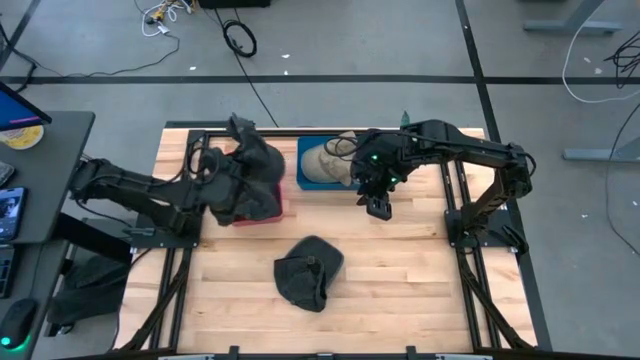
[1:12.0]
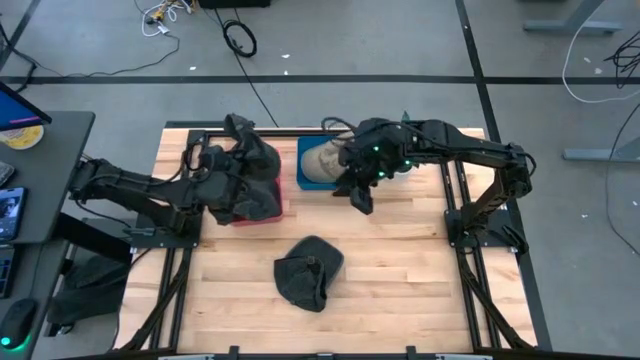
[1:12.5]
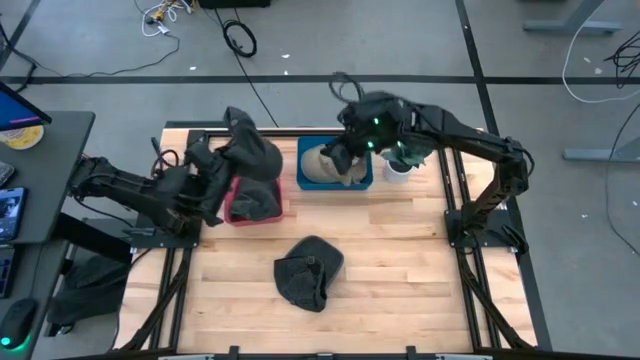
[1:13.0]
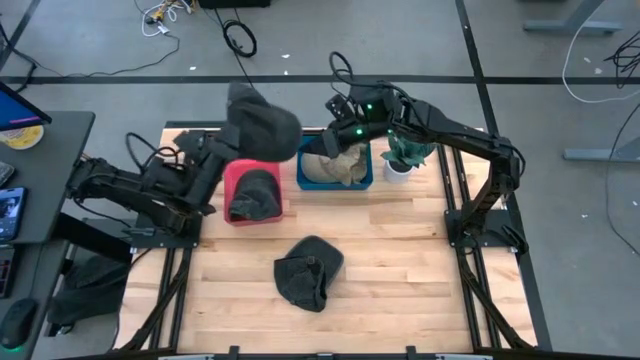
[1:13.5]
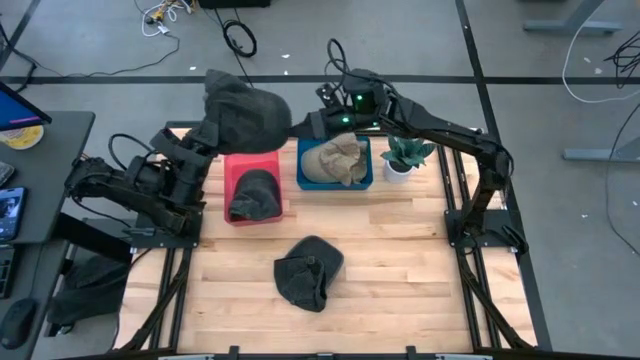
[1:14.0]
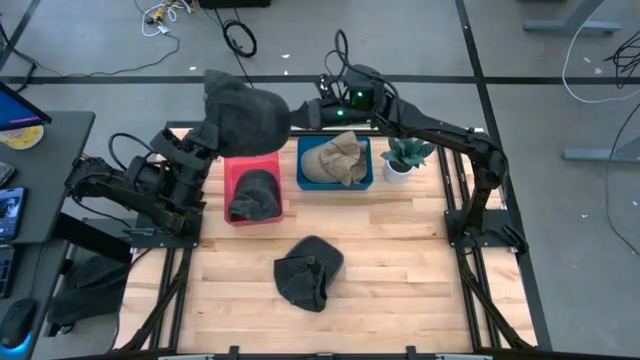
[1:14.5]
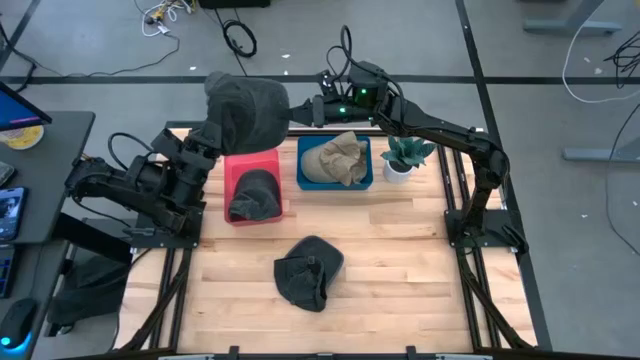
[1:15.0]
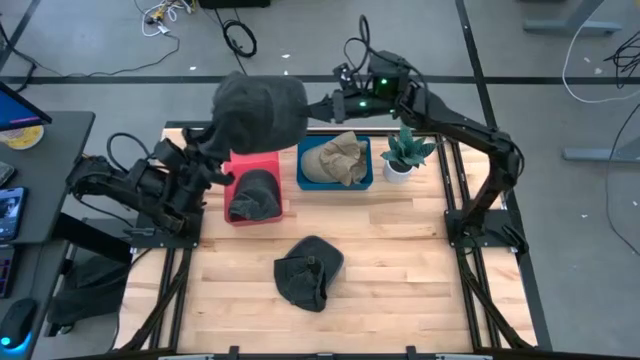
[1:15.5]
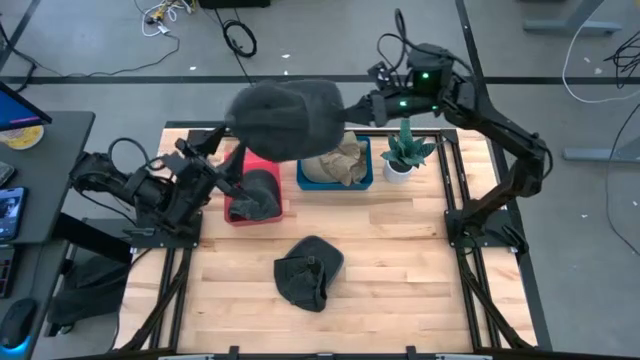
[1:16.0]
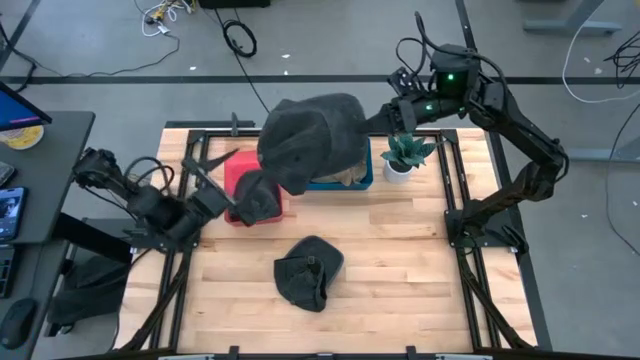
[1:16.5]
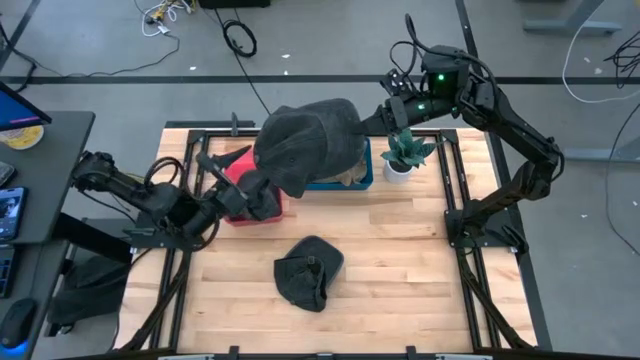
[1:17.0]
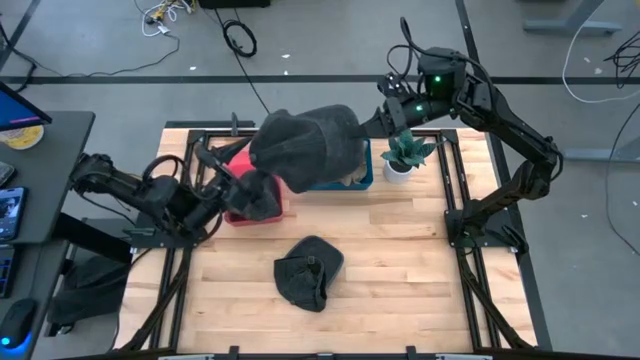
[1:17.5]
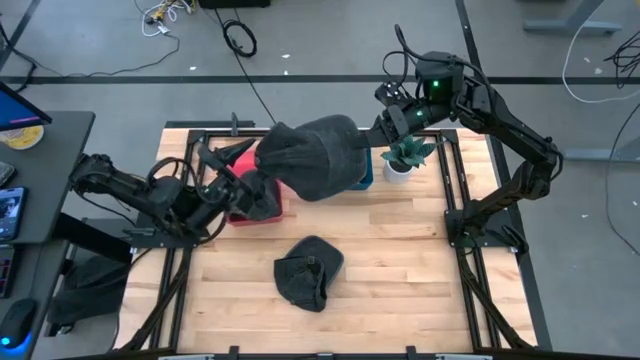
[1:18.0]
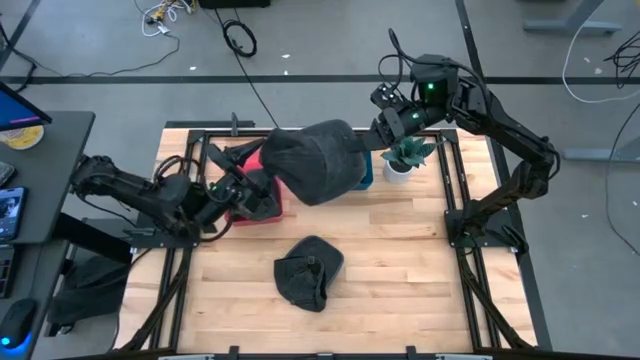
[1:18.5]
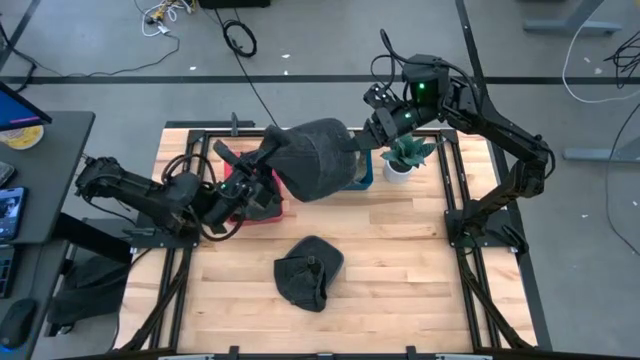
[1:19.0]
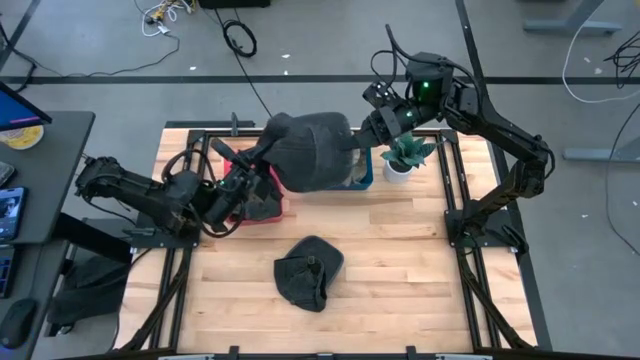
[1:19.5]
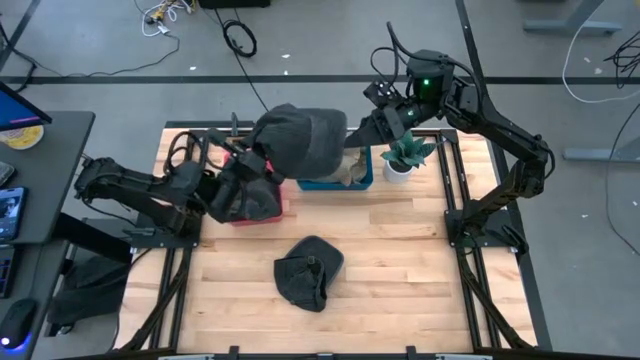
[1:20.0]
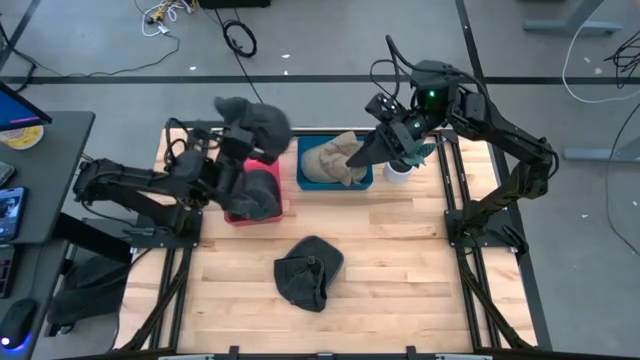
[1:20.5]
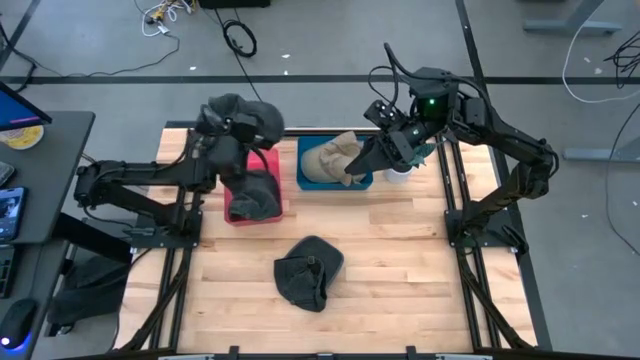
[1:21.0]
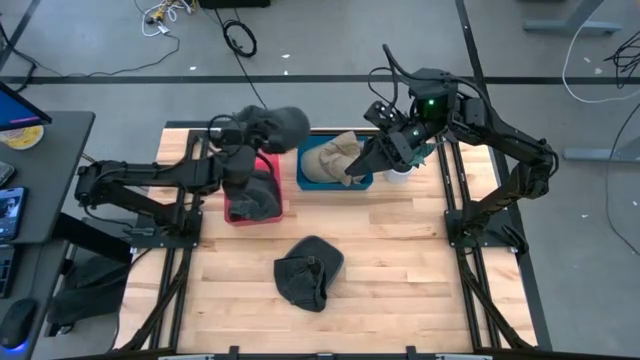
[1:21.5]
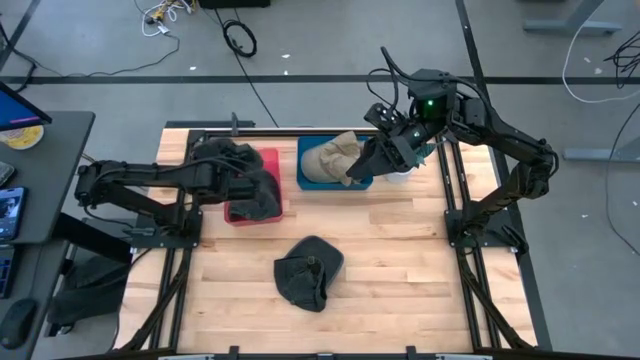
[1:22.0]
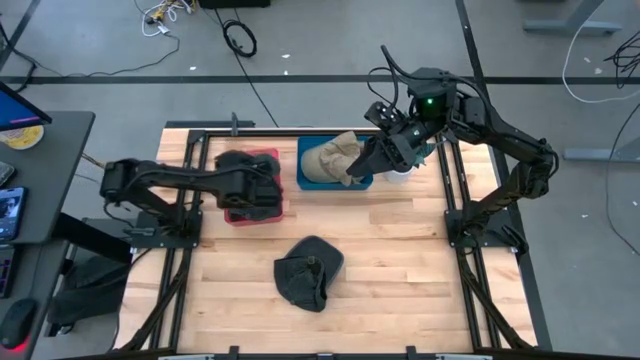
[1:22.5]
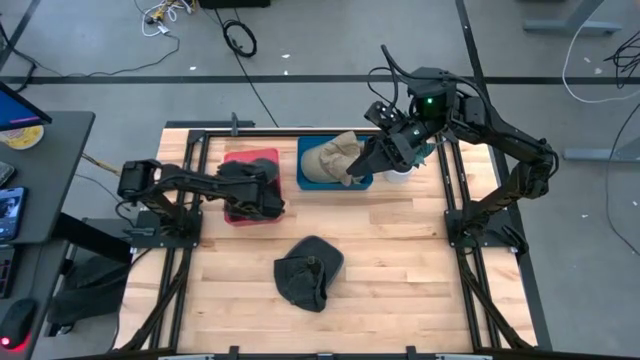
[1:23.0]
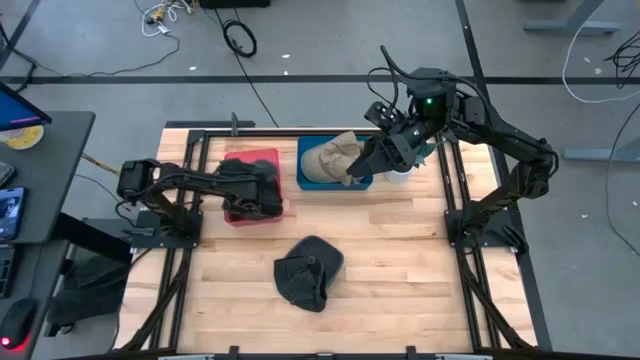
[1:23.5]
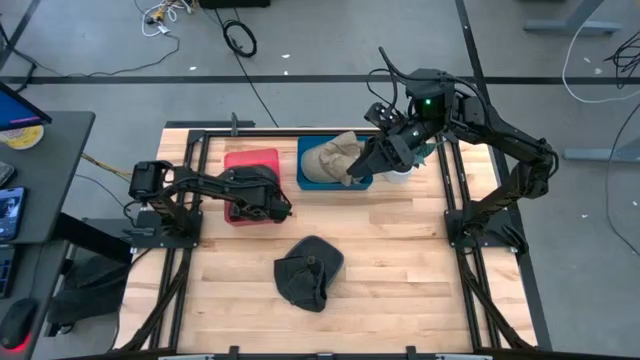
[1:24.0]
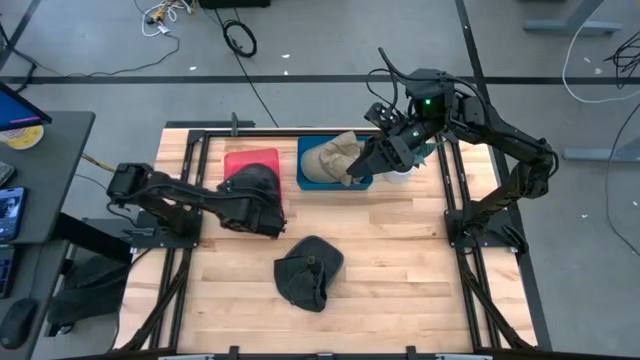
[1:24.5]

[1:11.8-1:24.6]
Task: Pick & Place hat
Put the top black cap into the red bin

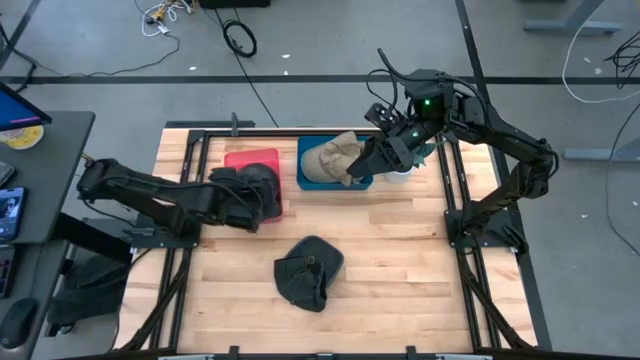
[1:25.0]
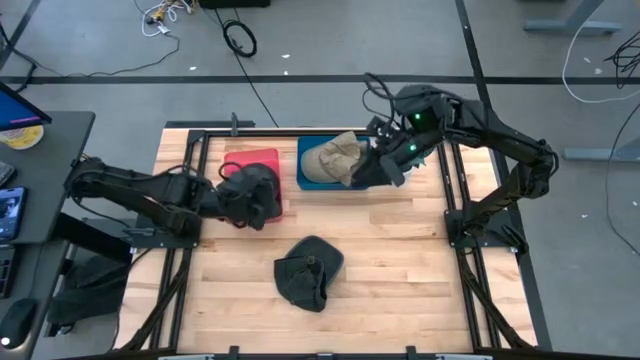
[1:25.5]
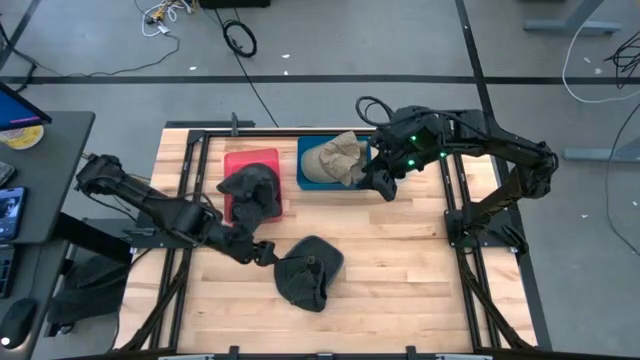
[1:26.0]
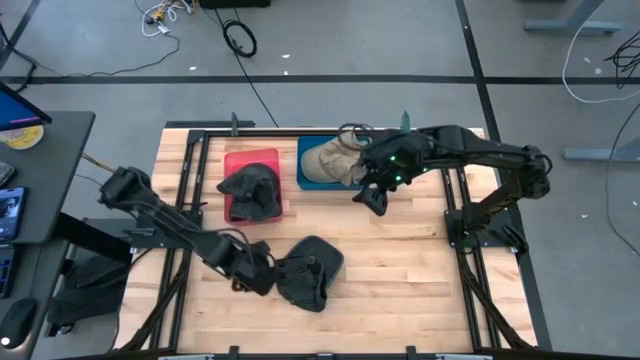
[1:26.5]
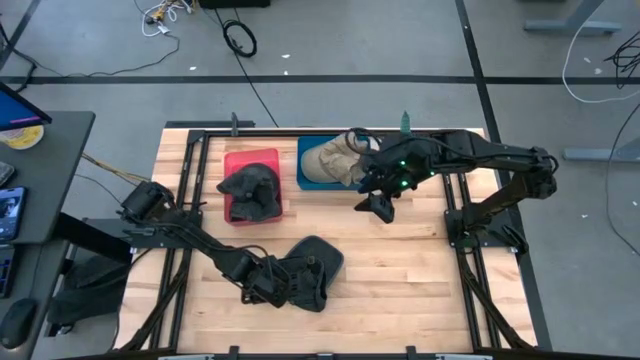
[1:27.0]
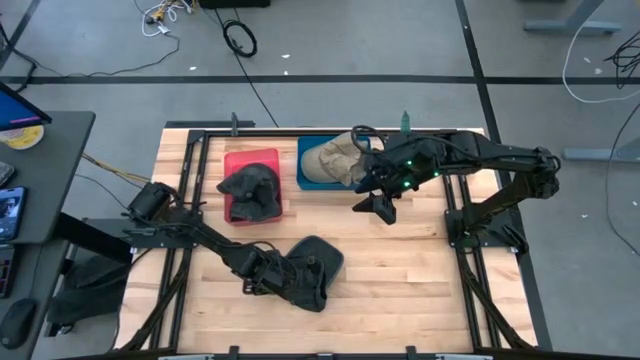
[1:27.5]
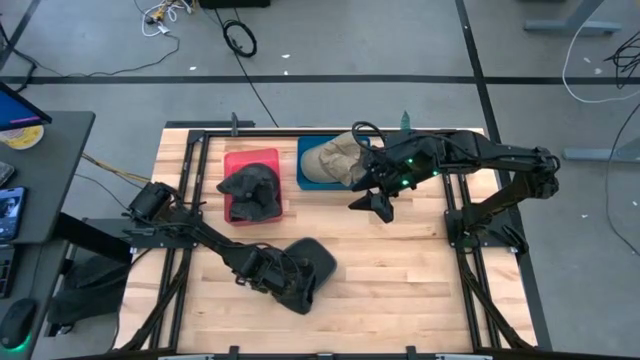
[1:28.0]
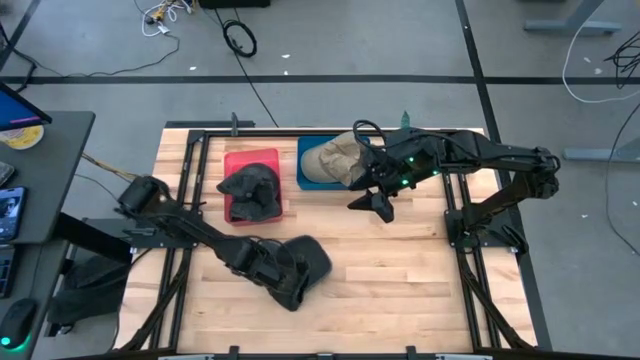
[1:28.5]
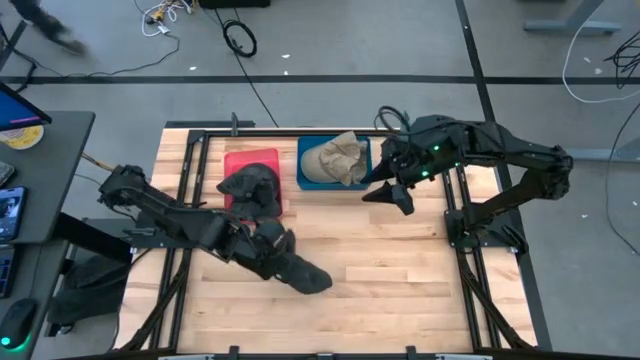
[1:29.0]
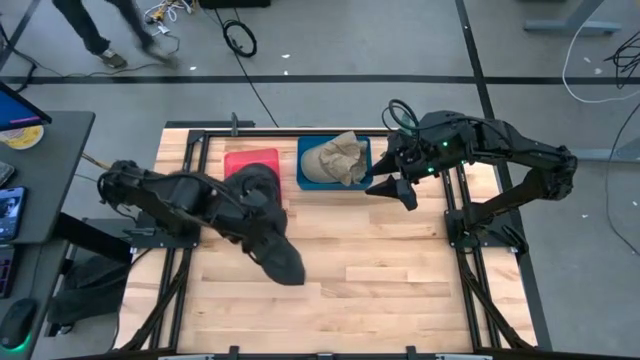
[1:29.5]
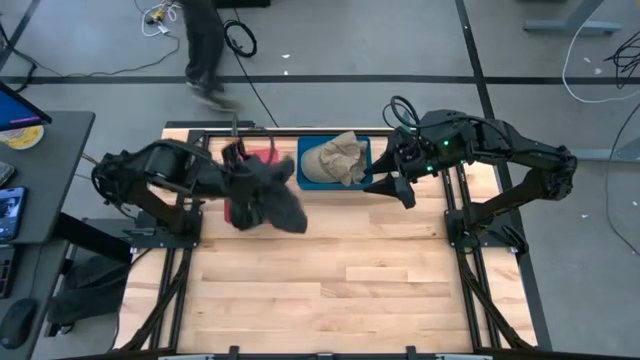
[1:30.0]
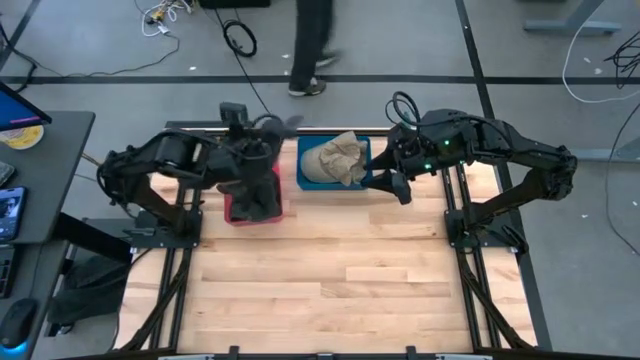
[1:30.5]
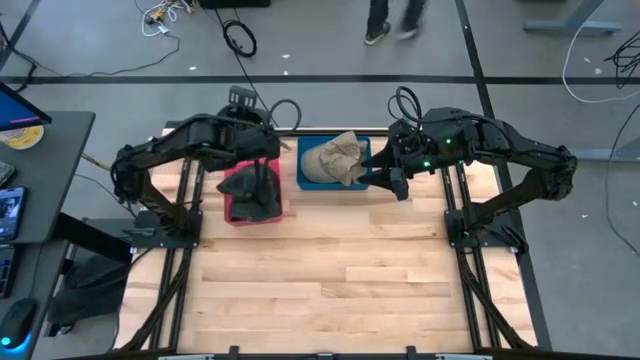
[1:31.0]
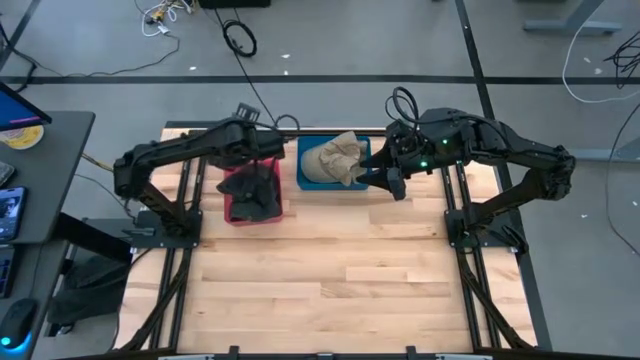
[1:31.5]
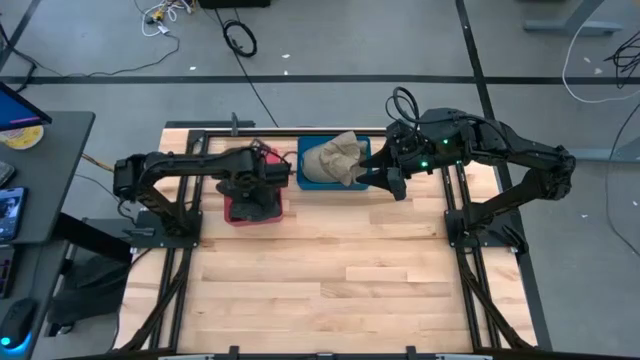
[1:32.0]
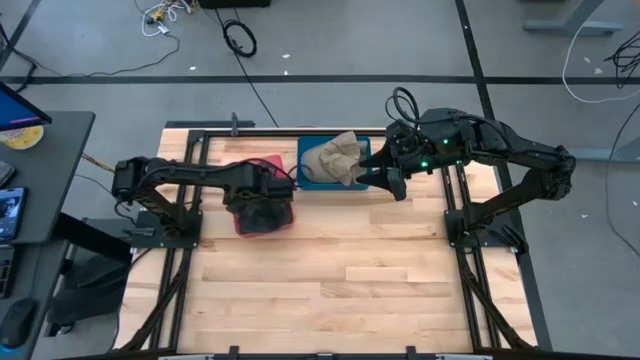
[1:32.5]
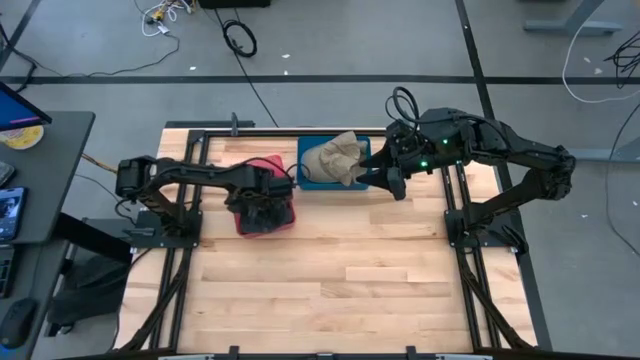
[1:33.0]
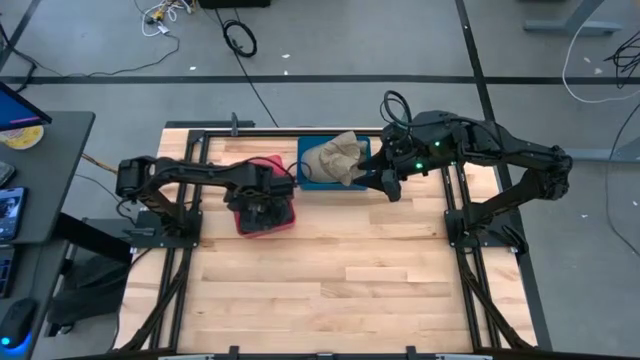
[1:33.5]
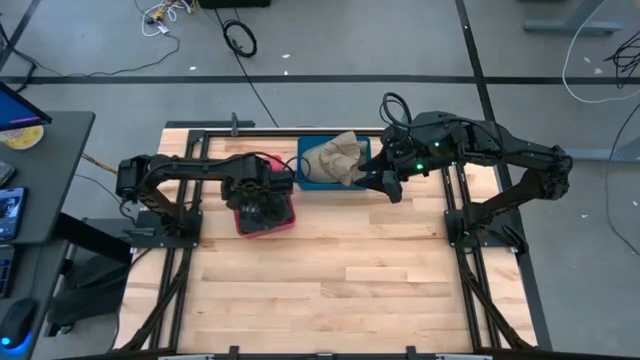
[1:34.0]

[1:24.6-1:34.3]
Put the black cap into the red bin
